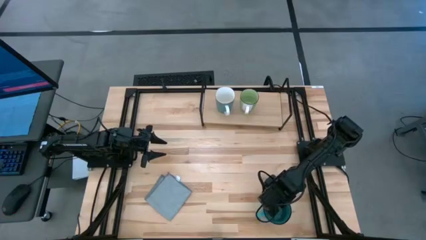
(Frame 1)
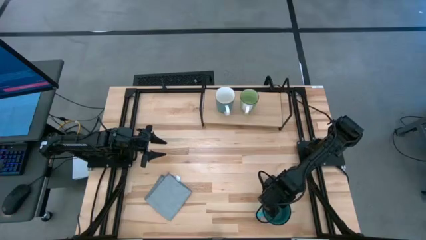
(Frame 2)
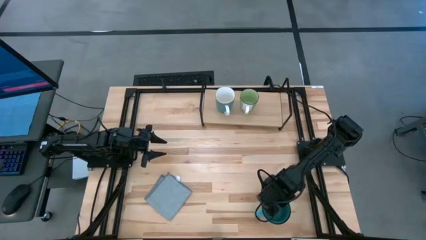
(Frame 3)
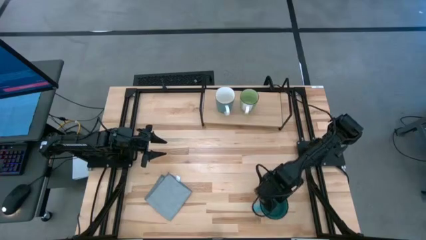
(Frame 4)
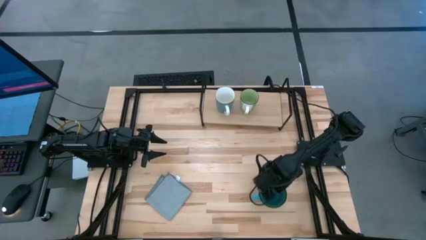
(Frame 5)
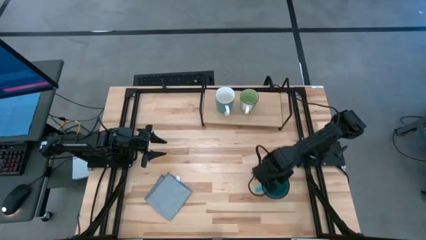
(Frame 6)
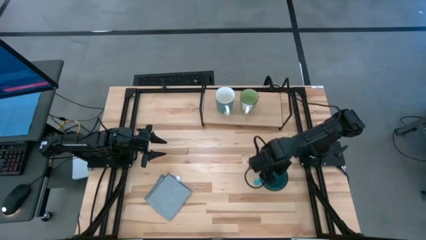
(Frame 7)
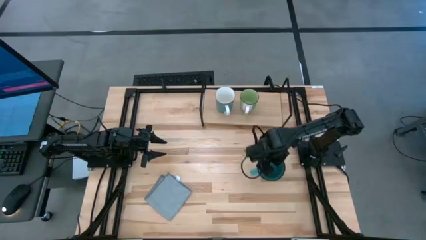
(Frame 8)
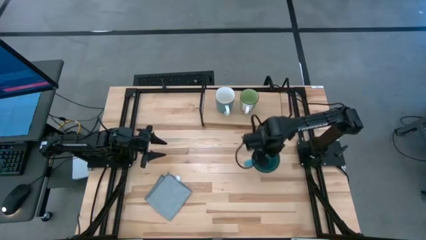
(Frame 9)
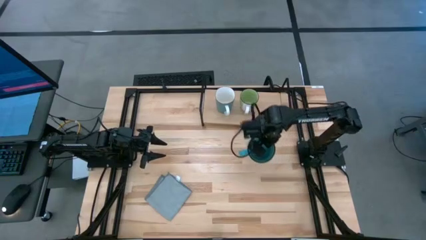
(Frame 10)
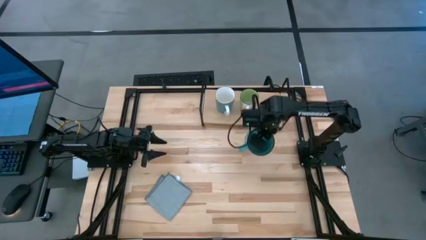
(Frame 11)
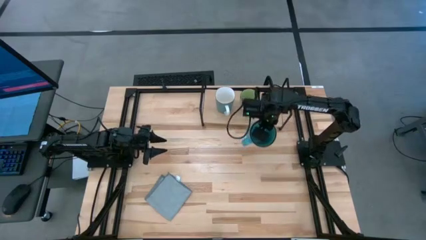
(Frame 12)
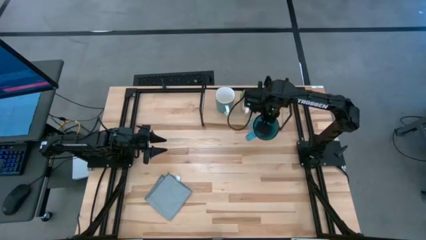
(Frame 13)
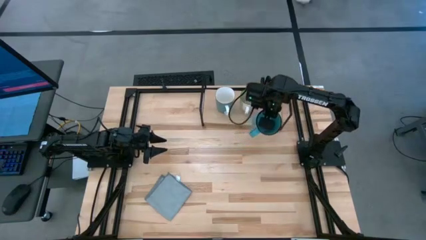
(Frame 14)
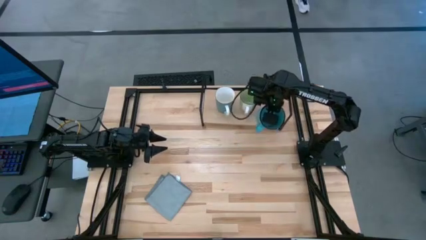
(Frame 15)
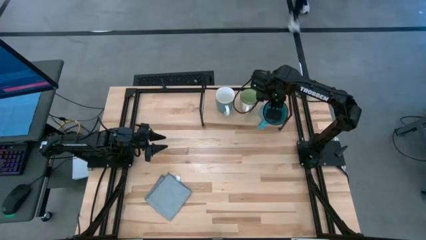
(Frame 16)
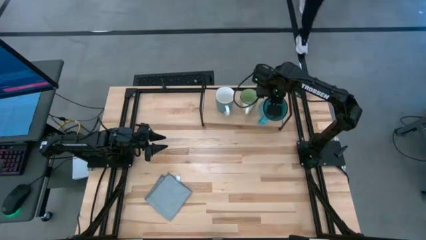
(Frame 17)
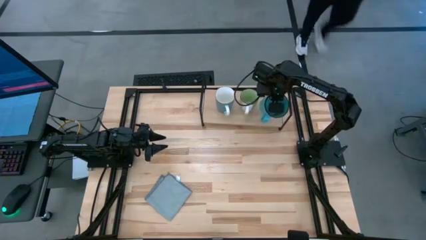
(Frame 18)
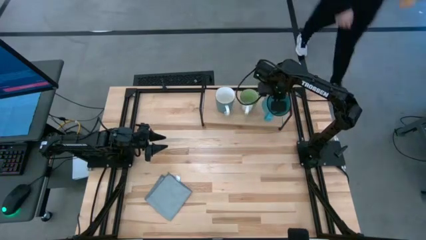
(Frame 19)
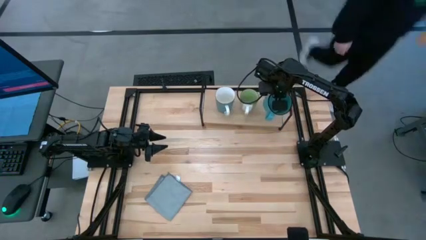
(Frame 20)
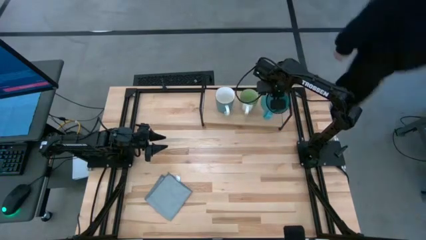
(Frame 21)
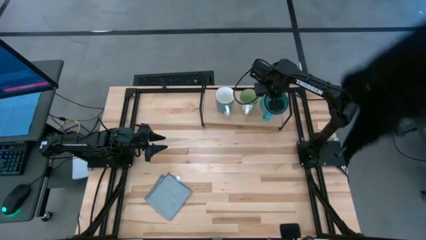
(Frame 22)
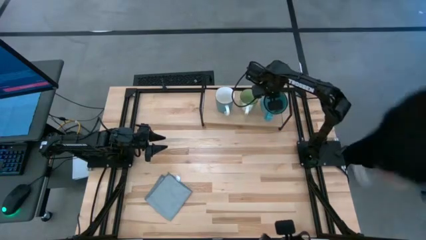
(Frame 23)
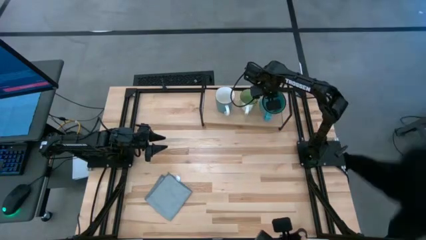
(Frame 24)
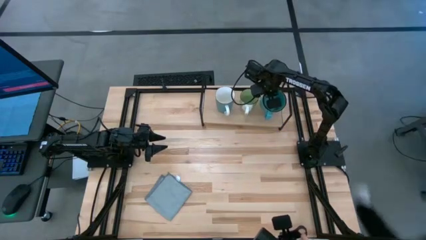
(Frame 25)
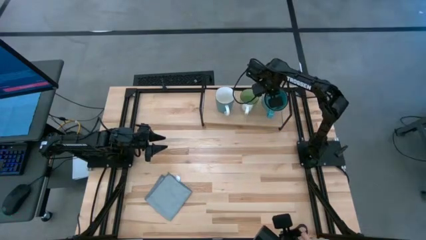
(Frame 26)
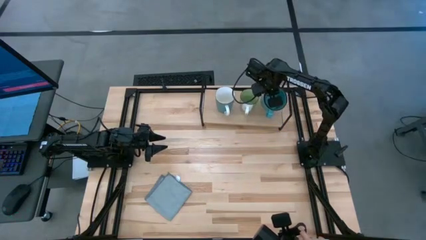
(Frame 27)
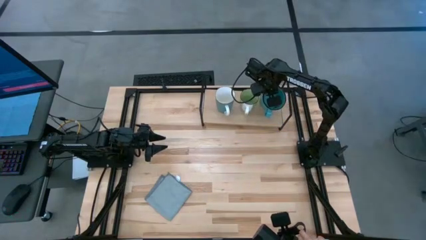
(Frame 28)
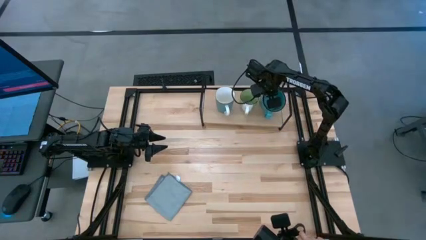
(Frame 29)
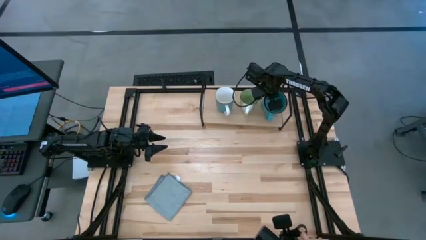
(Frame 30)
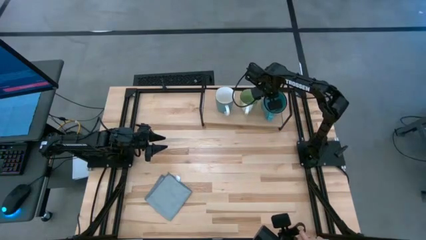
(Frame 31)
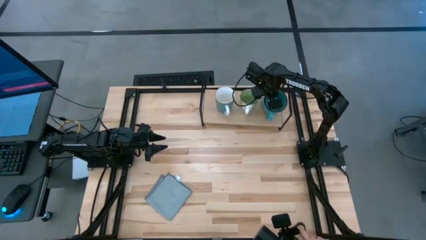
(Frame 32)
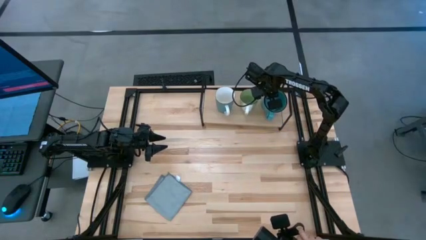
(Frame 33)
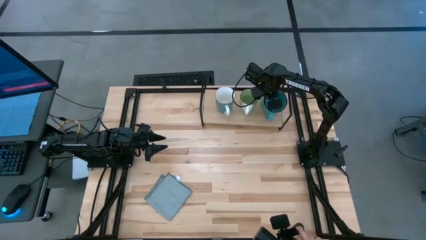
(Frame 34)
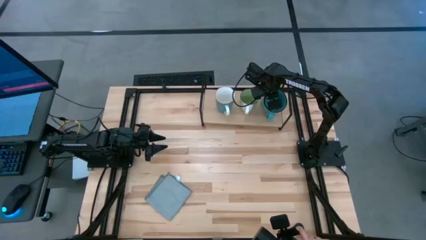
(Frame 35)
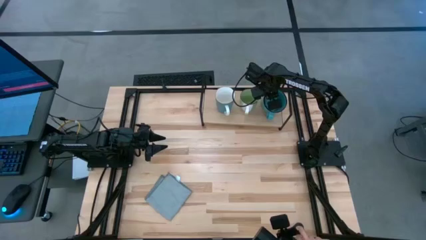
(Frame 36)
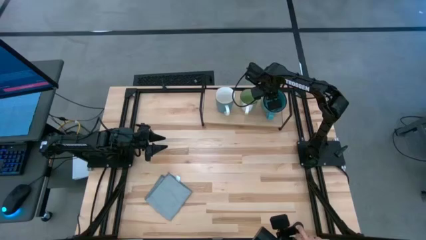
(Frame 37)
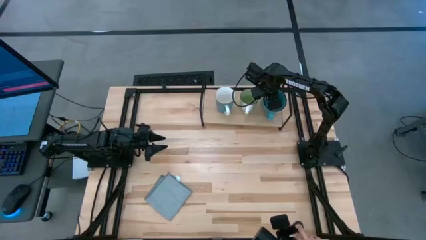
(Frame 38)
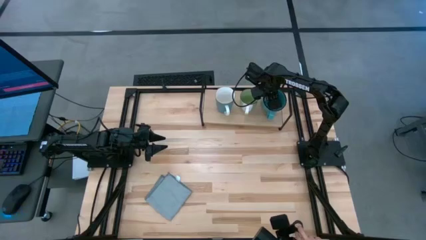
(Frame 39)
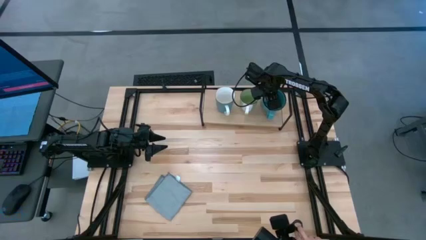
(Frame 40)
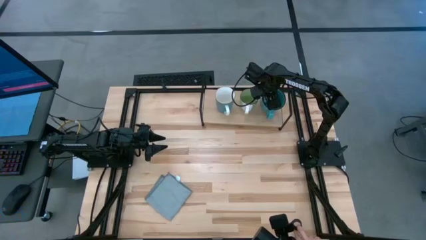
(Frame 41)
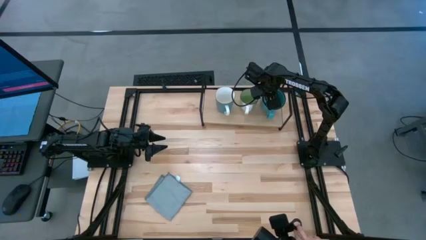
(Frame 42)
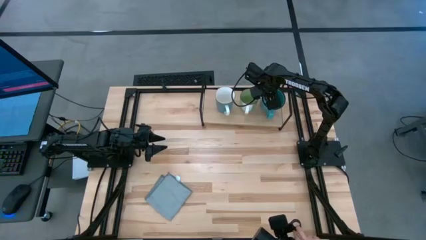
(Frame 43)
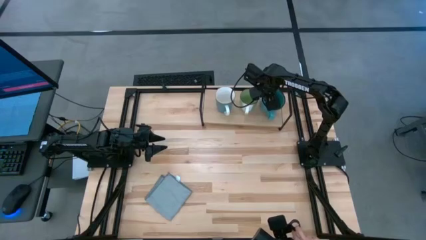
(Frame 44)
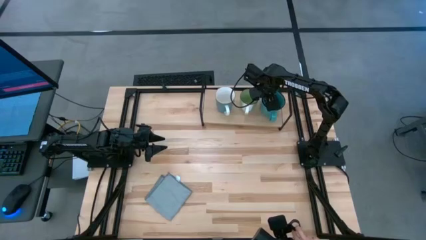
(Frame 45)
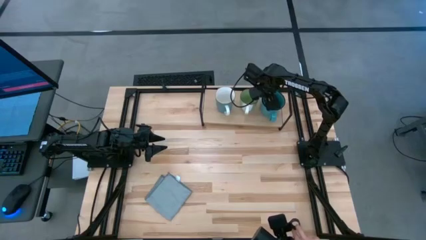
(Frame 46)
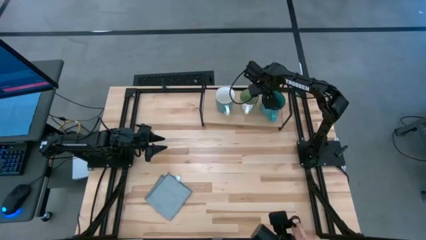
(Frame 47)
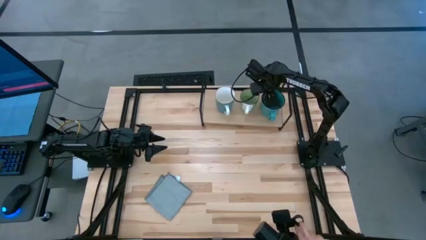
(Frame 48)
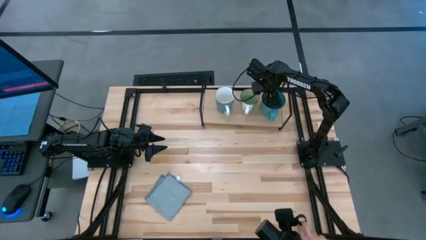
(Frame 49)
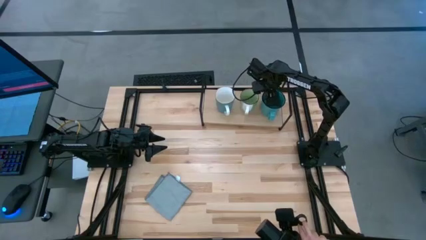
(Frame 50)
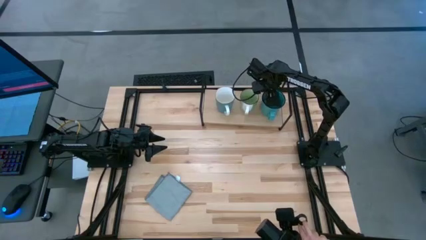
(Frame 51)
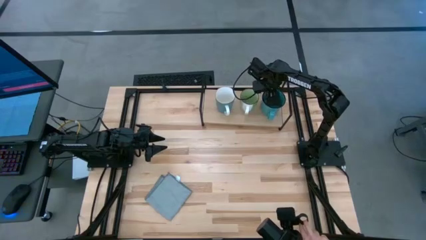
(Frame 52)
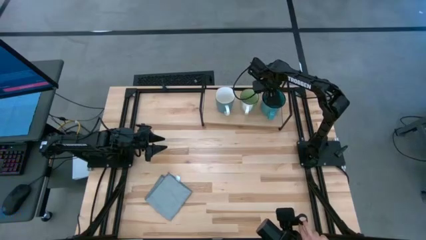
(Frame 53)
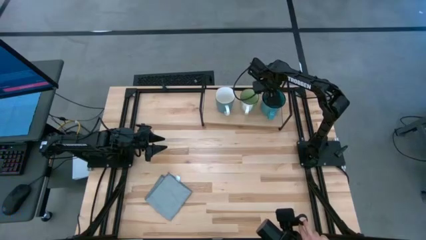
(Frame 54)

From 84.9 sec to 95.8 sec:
Task: Stack small to large cups/mugs on shelf
Put the blue mug on the shelf
